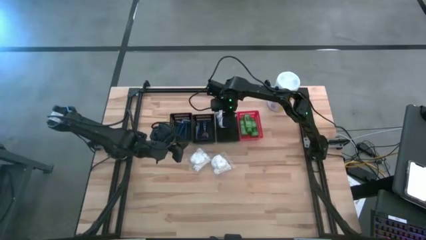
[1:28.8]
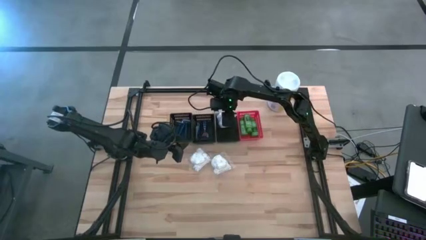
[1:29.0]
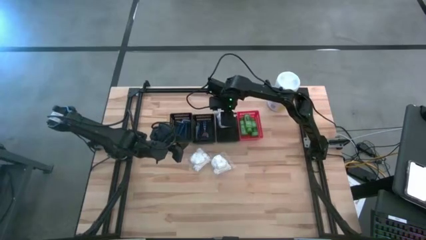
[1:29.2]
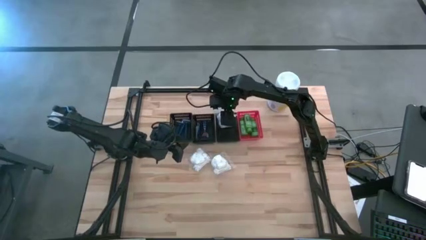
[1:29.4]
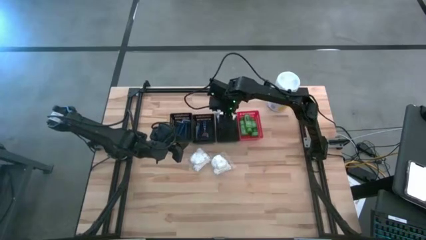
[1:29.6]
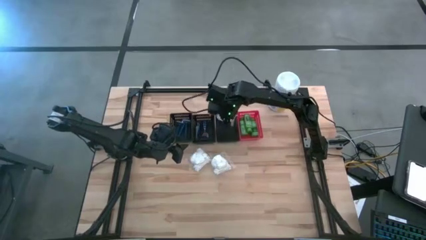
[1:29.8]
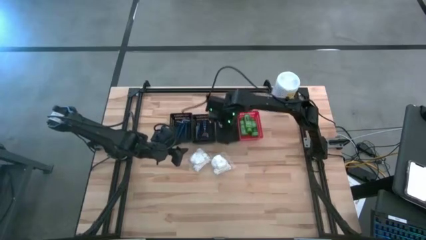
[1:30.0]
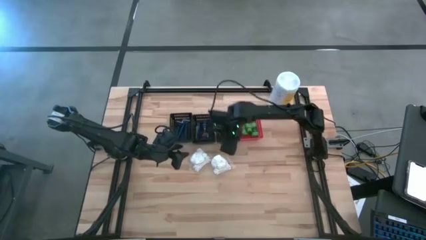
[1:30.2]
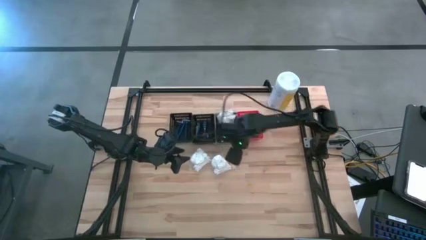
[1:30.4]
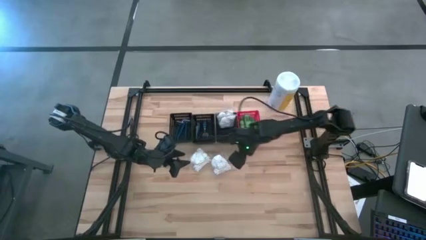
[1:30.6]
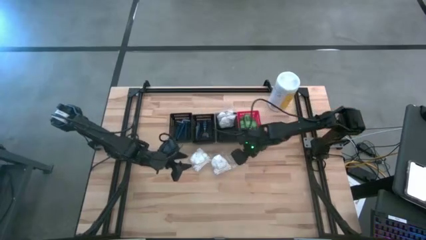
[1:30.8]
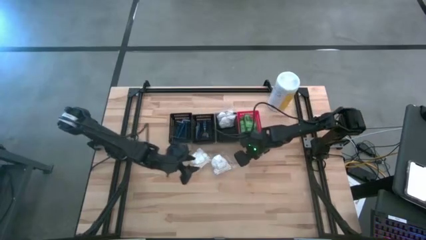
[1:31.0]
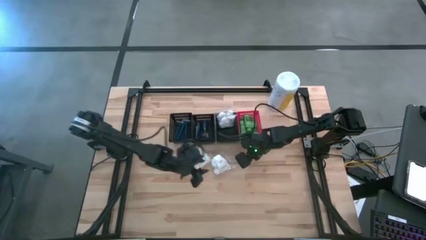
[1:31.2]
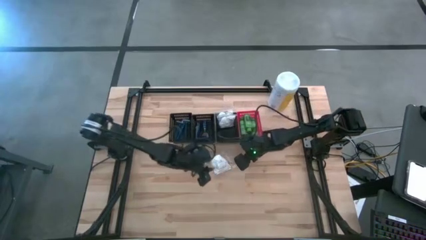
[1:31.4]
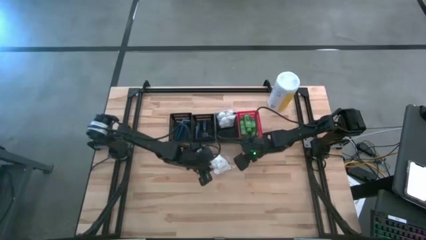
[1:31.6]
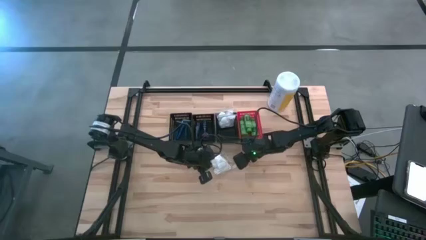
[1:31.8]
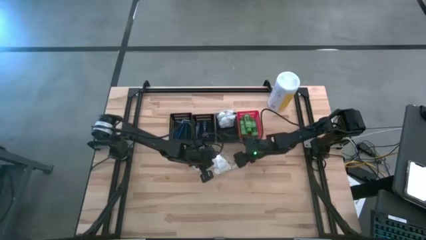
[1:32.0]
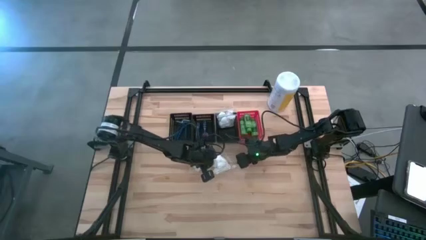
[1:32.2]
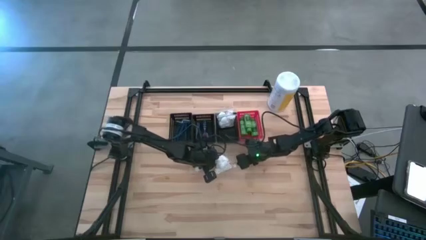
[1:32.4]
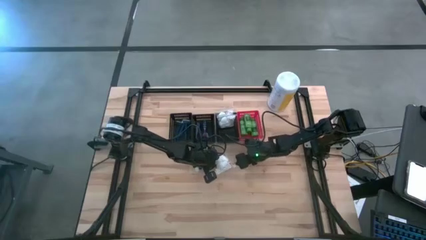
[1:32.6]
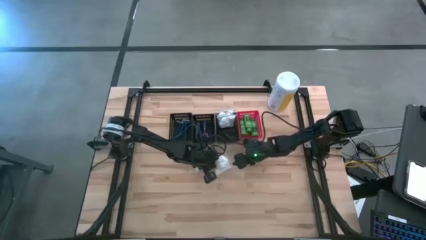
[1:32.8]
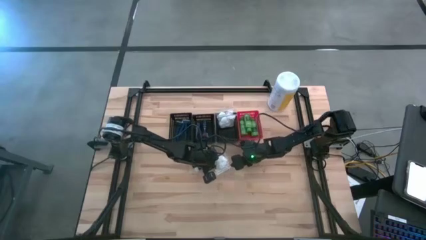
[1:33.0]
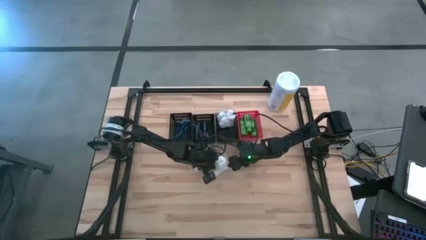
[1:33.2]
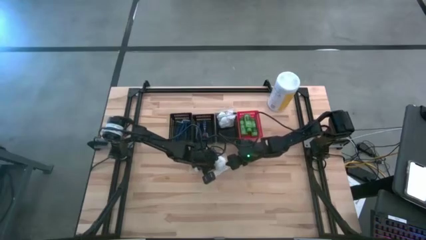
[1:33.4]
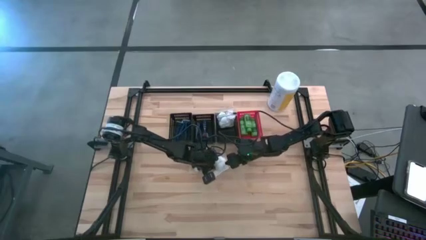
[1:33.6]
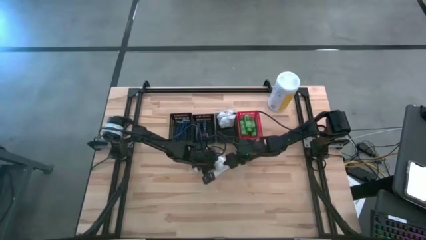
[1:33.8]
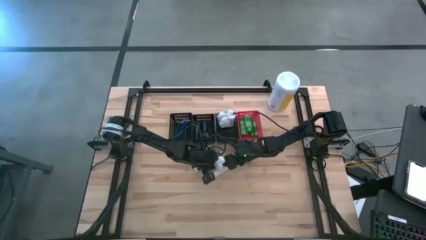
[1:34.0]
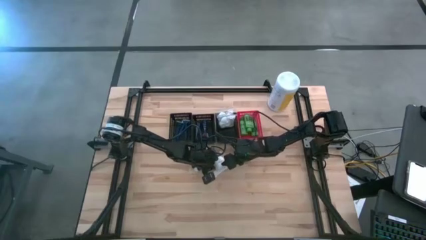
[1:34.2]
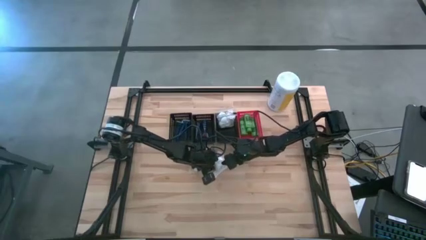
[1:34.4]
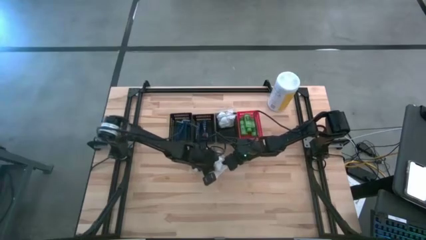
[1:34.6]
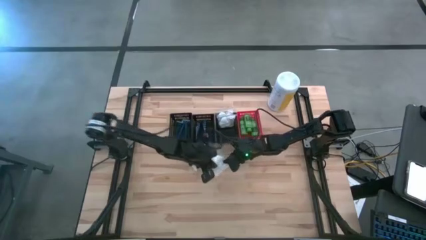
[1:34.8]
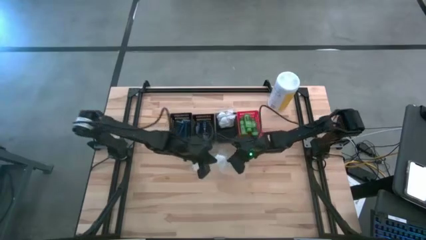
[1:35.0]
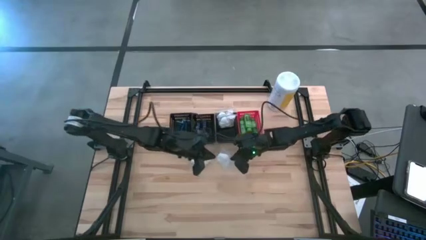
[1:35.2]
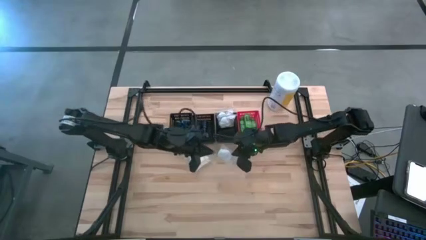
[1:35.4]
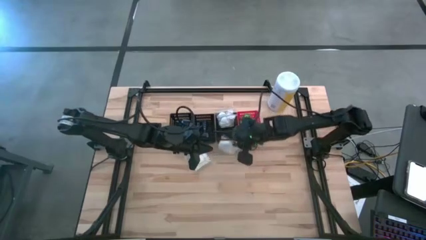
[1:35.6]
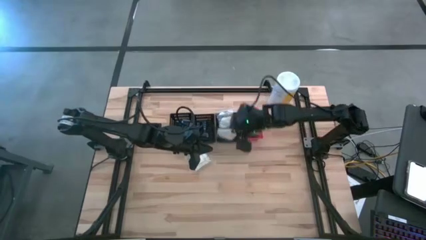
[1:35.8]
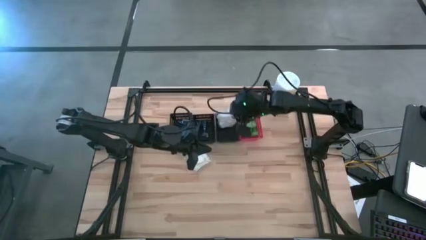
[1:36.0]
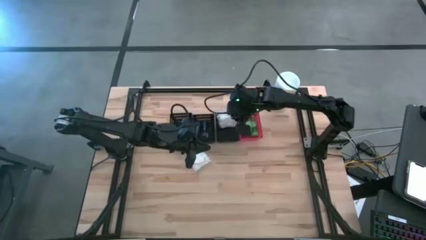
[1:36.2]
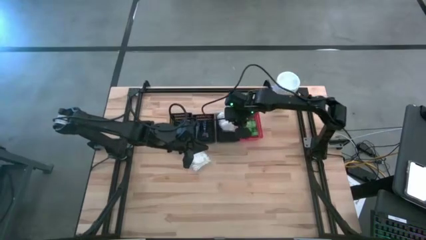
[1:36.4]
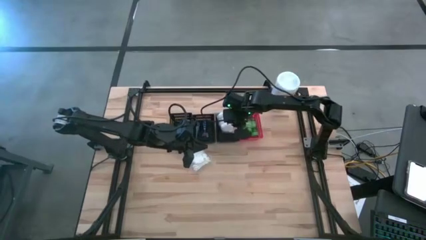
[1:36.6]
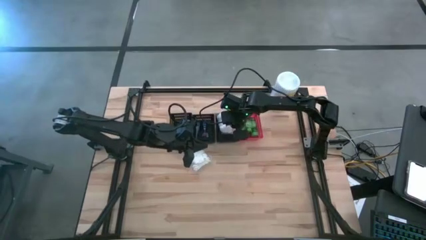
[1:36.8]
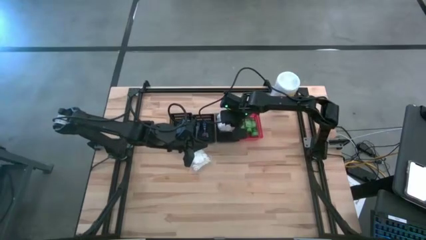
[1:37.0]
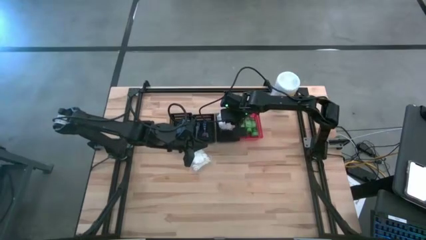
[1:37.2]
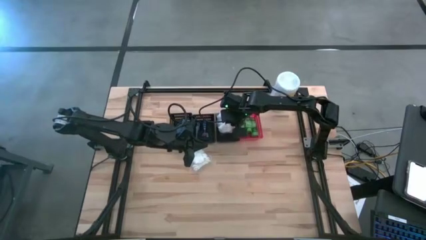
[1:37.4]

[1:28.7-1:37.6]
Task: Pick & Place Travel size toiletries
Put the white cotton pack into the right black bin

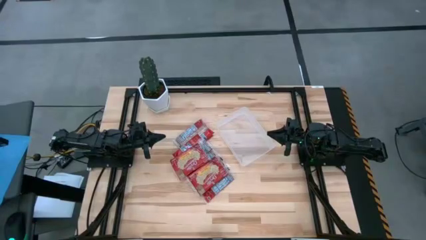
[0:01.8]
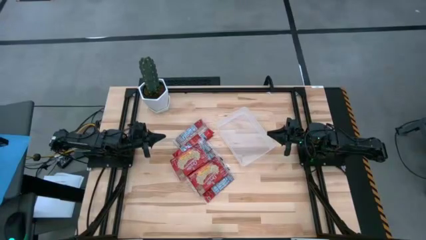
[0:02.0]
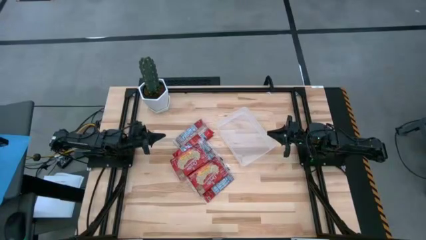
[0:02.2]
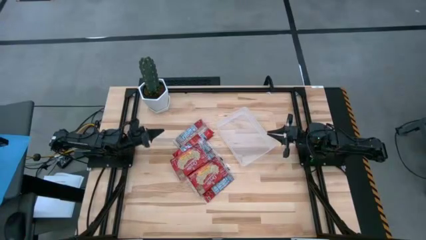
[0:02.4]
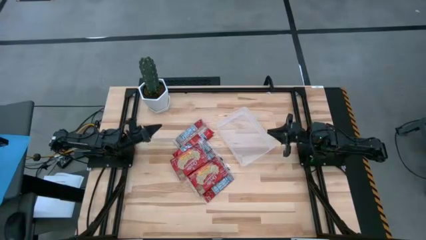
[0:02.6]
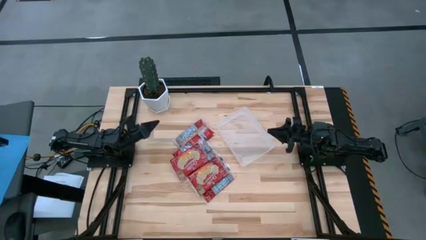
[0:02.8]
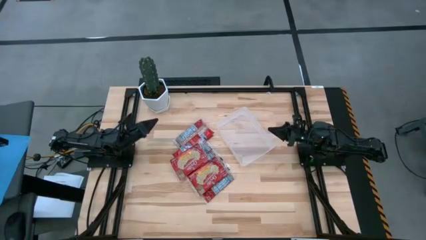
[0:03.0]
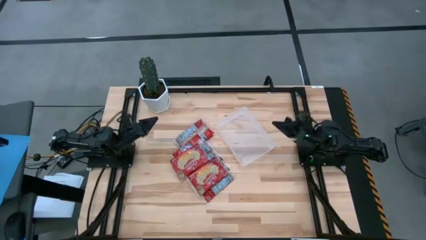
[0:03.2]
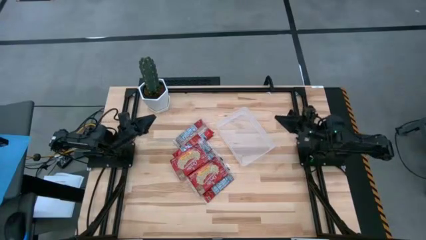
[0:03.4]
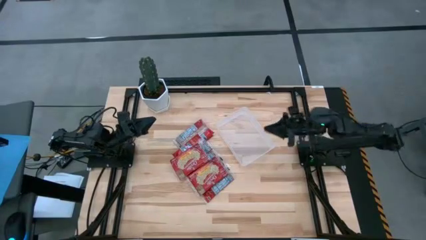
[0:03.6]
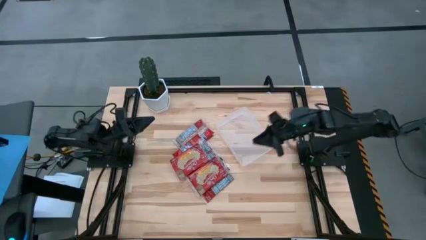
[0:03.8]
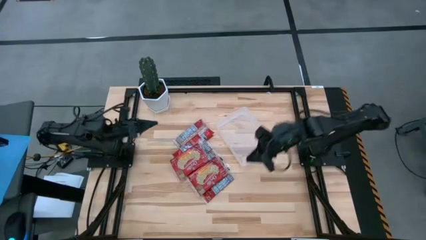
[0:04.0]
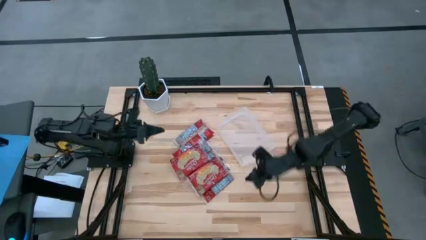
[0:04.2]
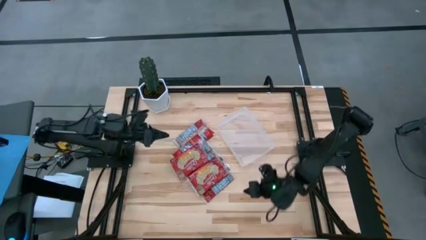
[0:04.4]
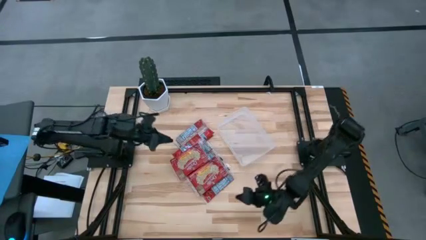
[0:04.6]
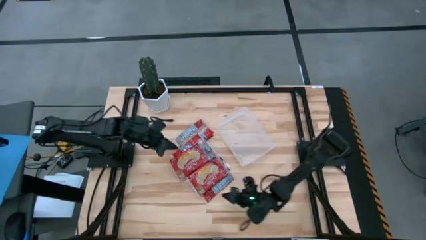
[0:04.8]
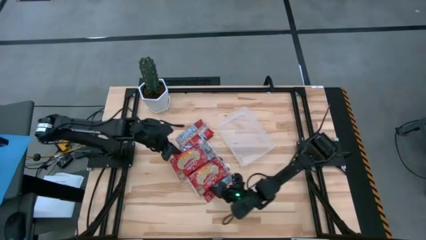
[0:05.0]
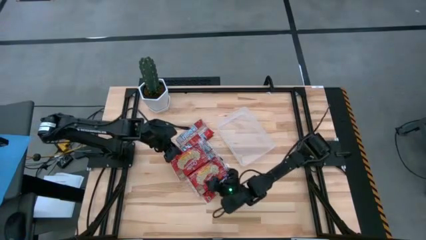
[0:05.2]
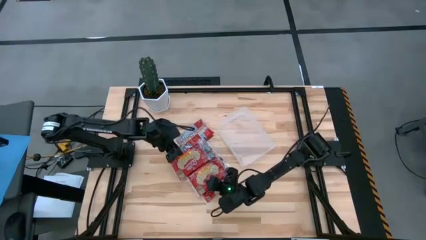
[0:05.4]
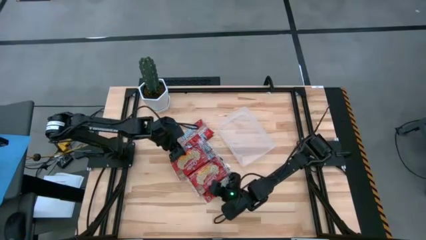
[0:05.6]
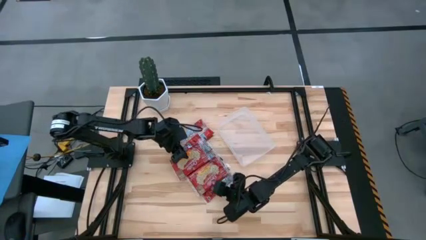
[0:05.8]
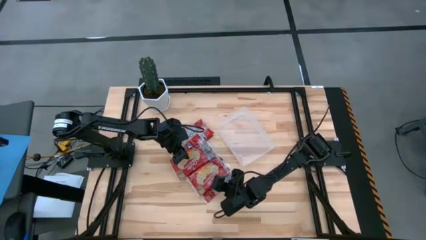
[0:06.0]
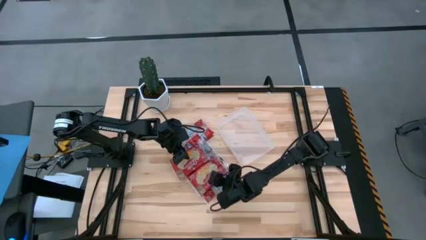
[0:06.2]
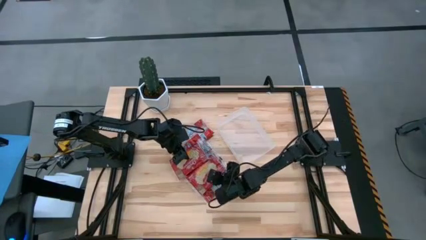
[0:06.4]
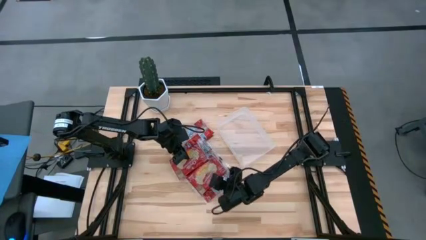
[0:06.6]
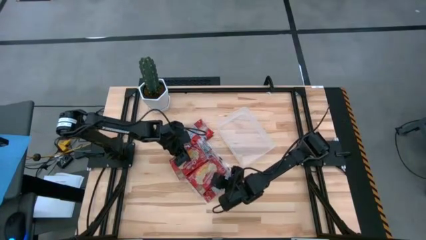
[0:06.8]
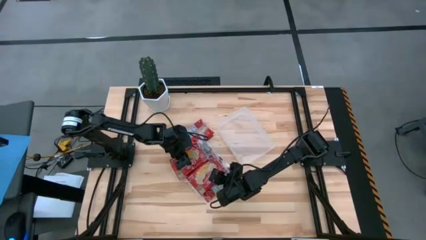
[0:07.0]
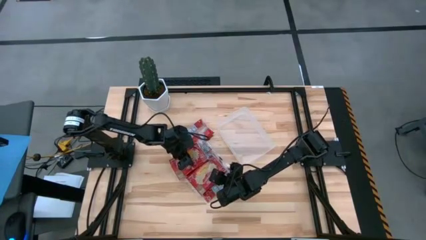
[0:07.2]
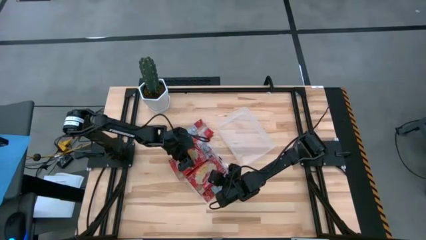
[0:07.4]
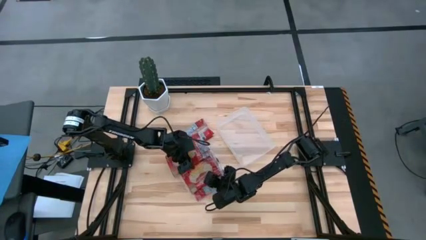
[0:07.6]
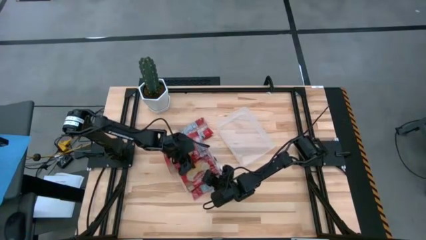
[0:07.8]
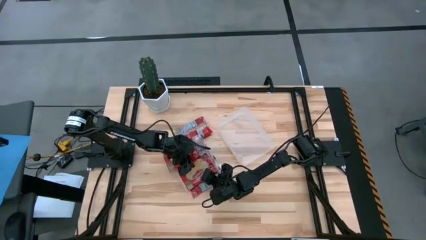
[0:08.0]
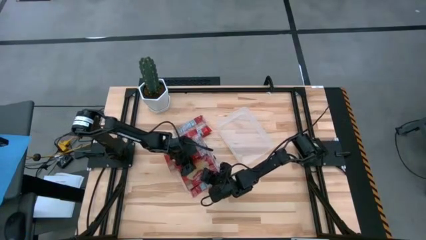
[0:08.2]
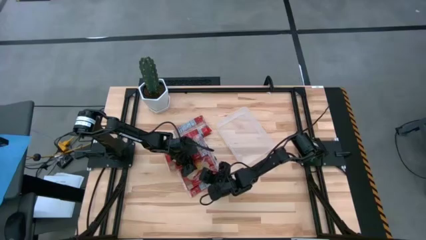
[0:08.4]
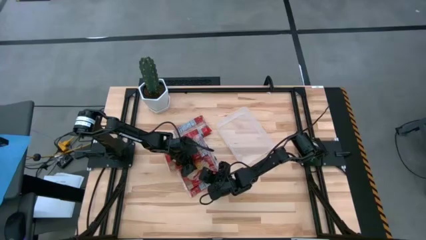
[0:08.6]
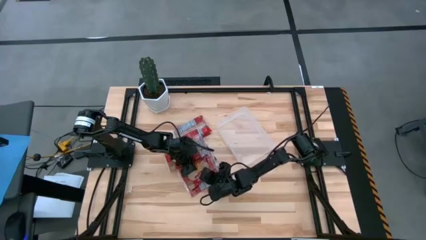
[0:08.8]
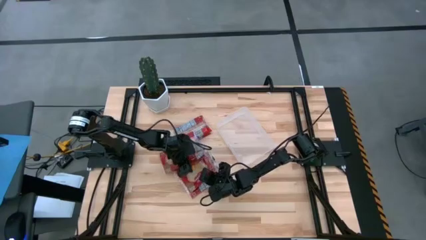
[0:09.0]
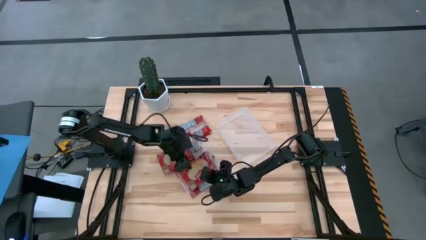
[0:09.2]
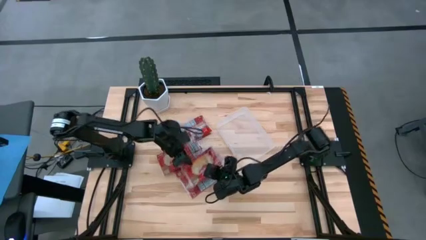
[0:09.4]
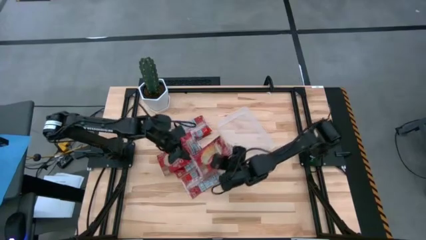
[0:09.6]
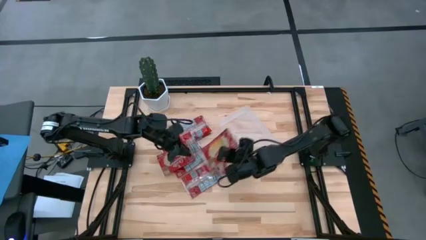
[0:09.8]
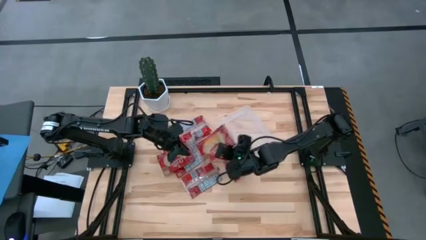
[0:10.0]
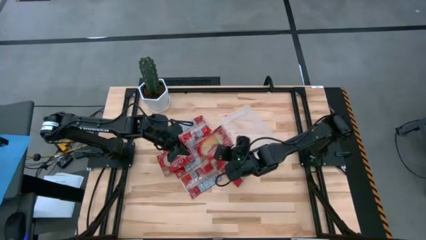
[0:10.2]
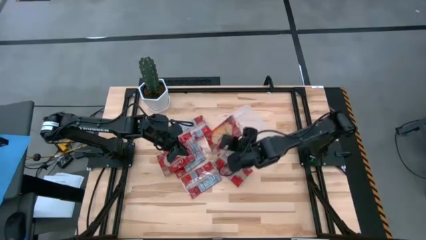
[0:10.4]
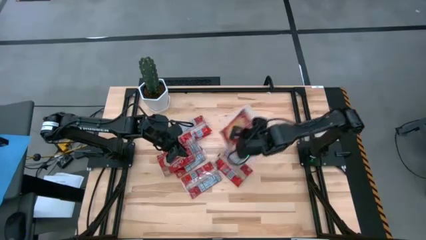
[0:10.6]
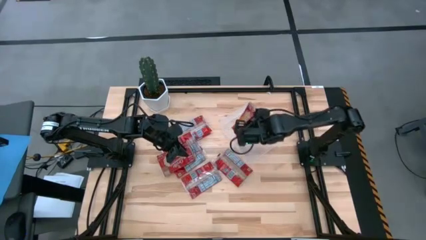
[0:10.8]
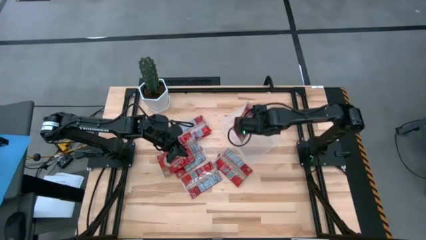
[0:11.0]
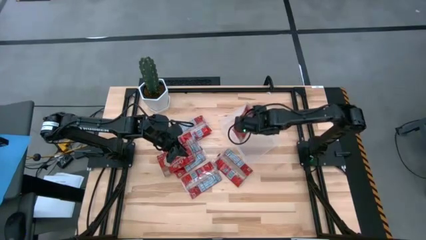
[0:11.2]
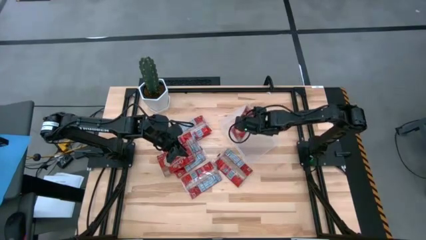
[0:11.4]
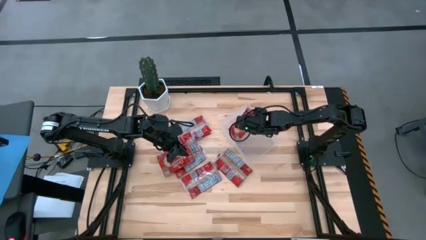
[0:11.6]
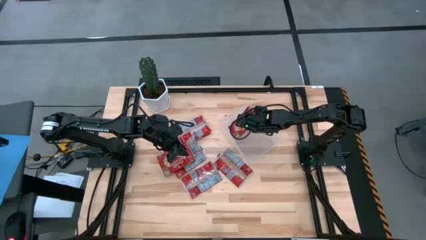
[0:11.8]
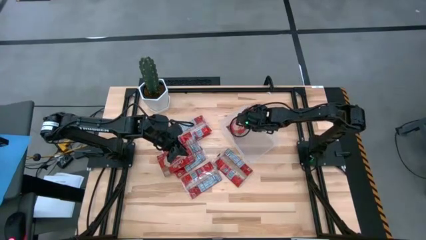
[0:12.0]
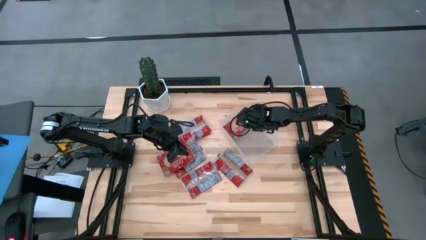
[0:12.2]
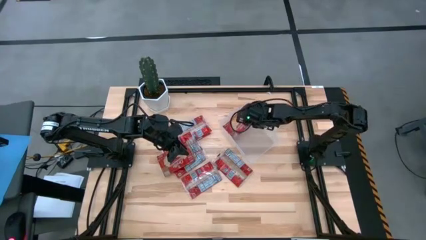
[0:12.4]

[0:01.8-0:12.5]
Task: Sort popcorn bags into baskets
Put the red popcorn bag into the transparent bin
